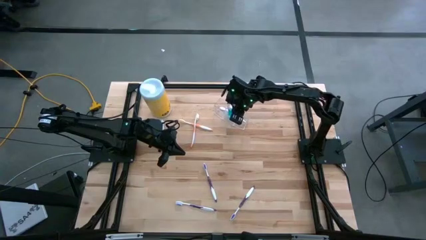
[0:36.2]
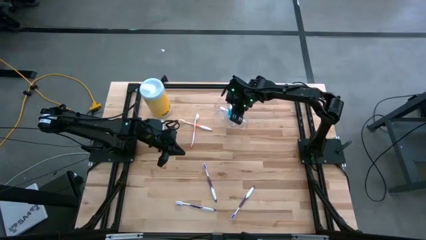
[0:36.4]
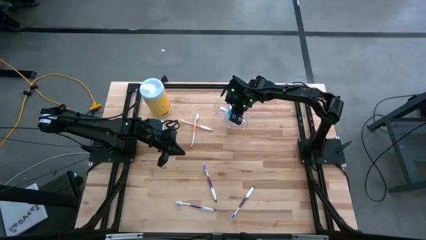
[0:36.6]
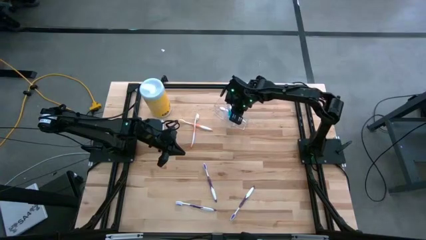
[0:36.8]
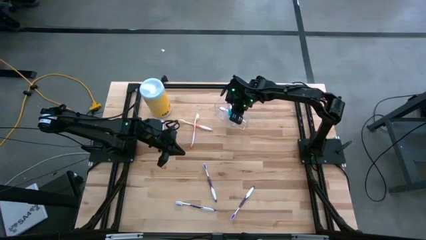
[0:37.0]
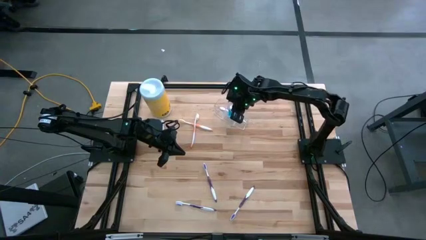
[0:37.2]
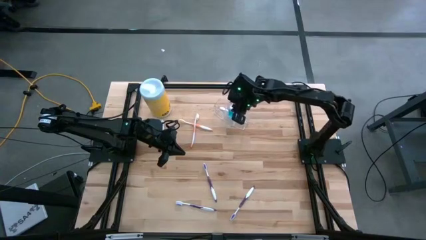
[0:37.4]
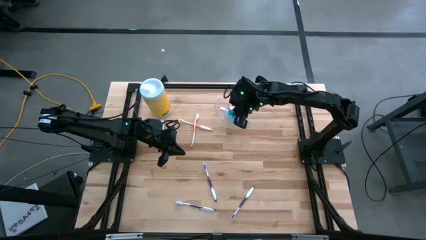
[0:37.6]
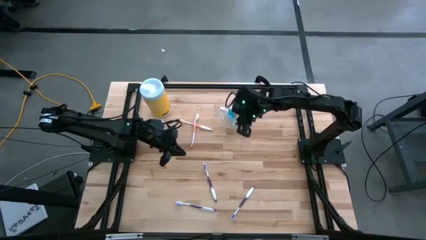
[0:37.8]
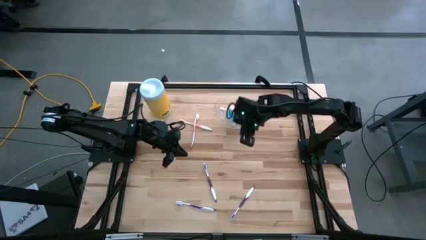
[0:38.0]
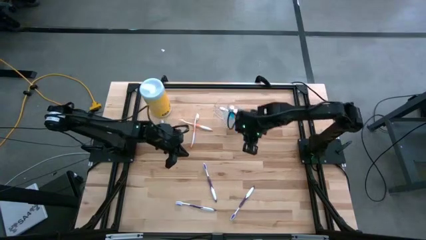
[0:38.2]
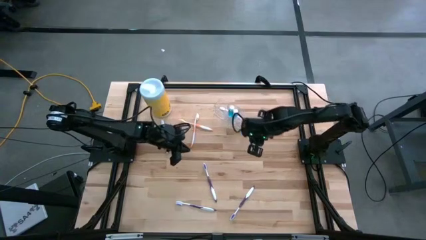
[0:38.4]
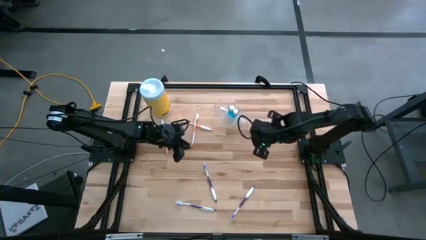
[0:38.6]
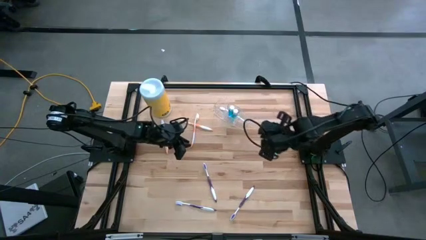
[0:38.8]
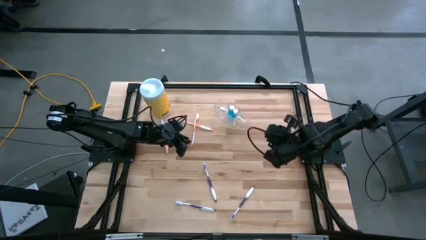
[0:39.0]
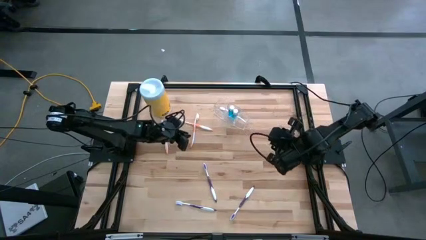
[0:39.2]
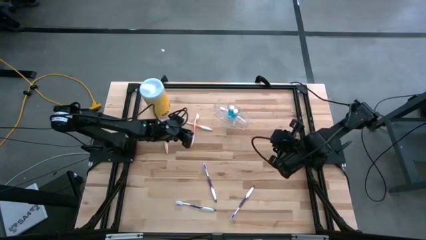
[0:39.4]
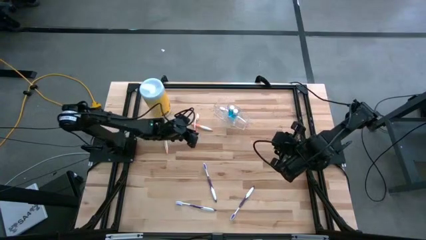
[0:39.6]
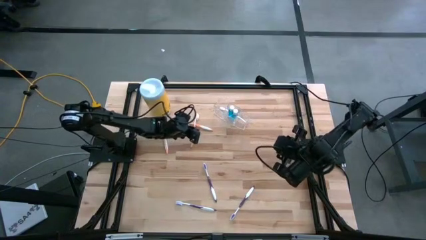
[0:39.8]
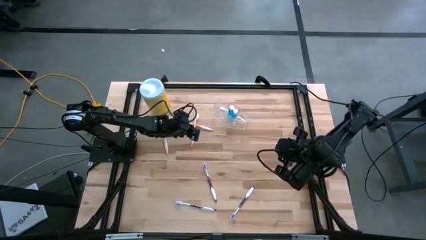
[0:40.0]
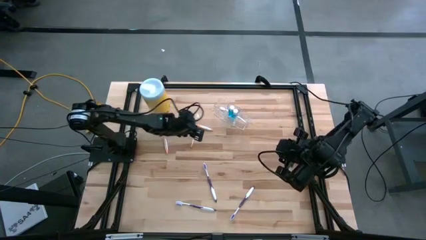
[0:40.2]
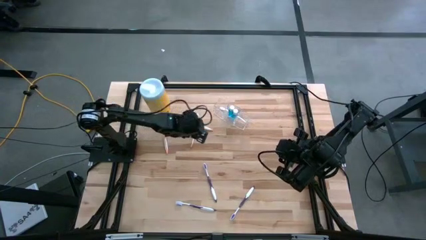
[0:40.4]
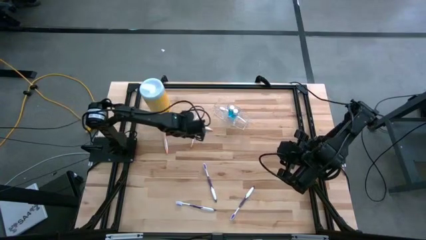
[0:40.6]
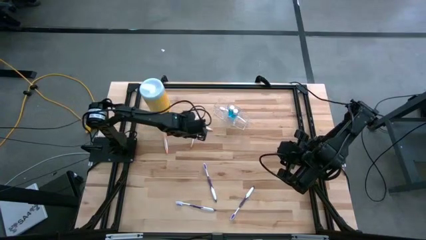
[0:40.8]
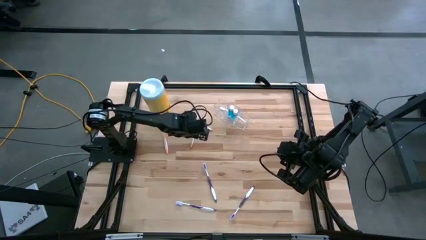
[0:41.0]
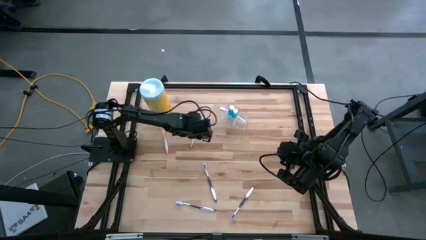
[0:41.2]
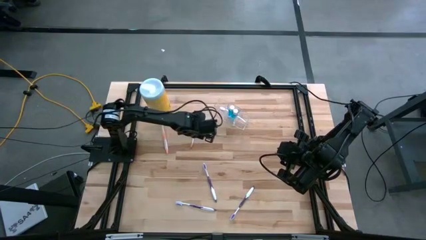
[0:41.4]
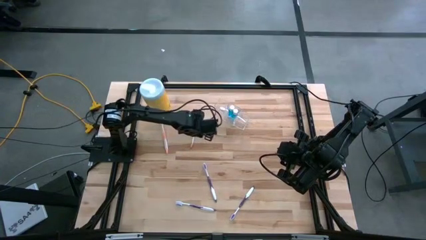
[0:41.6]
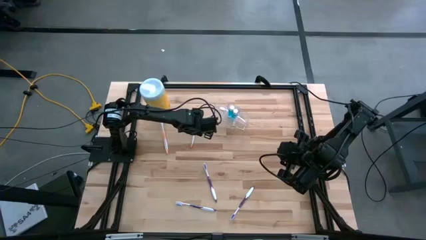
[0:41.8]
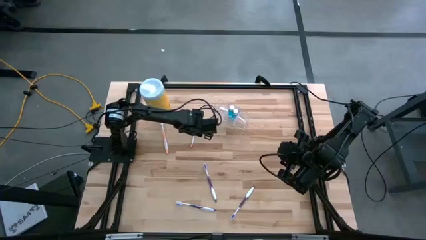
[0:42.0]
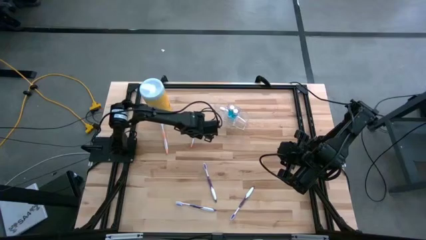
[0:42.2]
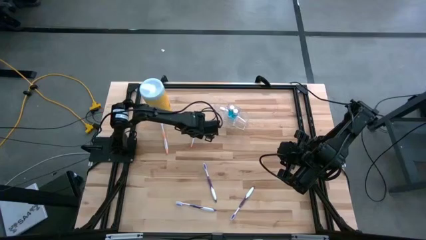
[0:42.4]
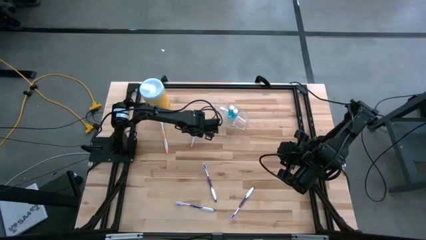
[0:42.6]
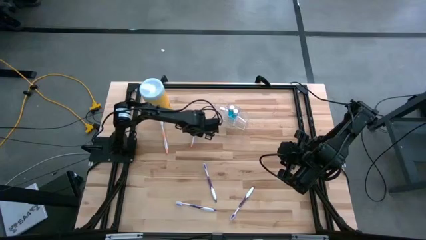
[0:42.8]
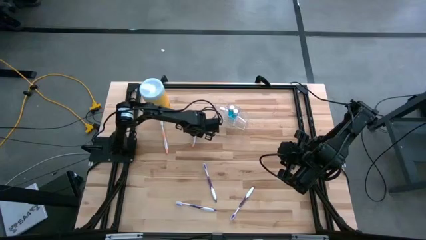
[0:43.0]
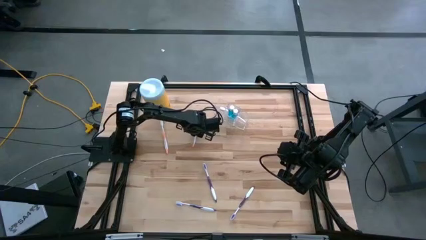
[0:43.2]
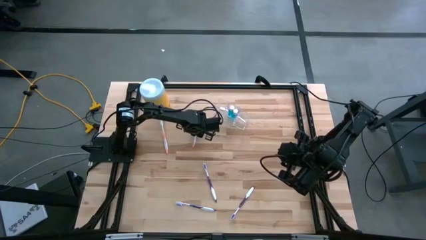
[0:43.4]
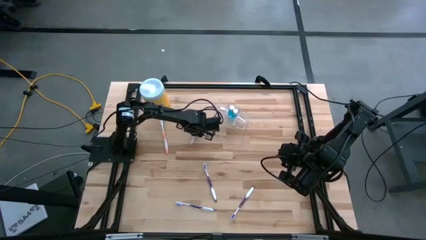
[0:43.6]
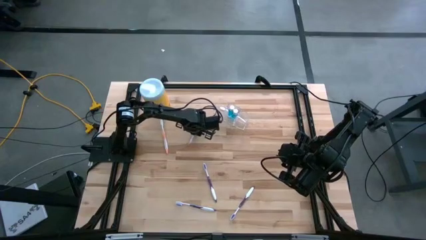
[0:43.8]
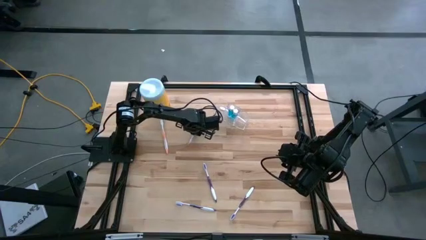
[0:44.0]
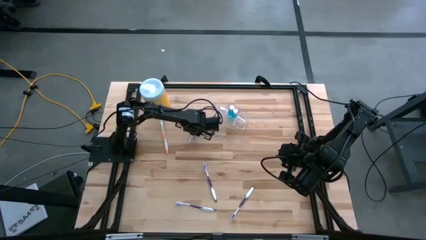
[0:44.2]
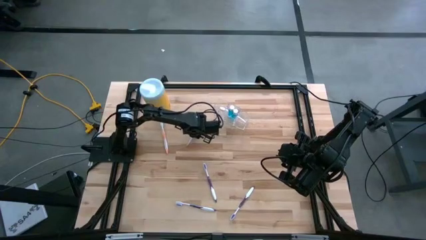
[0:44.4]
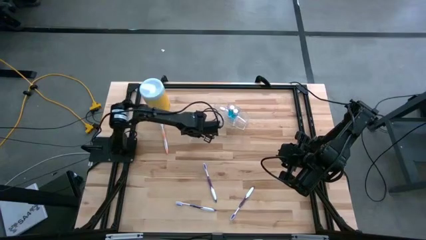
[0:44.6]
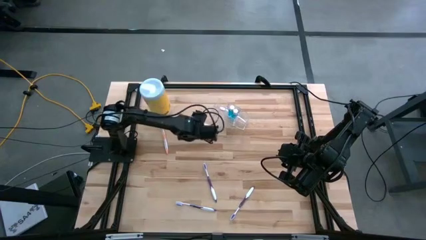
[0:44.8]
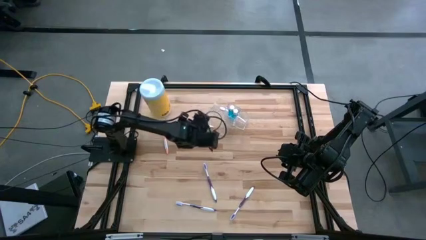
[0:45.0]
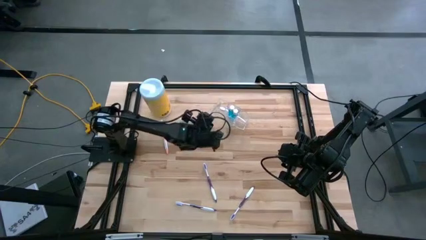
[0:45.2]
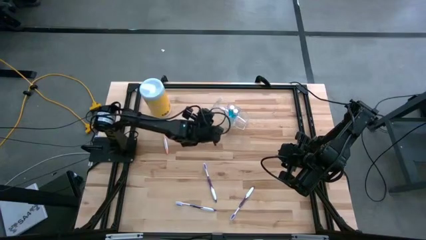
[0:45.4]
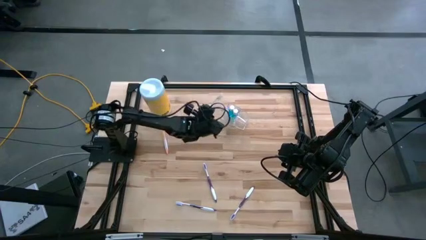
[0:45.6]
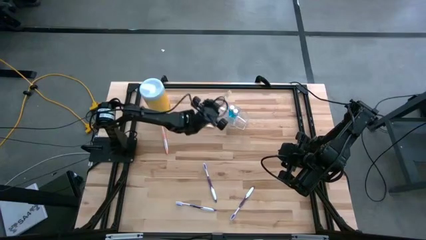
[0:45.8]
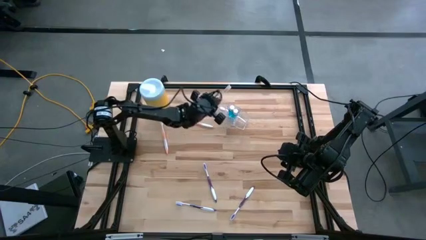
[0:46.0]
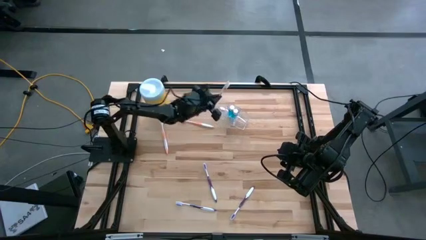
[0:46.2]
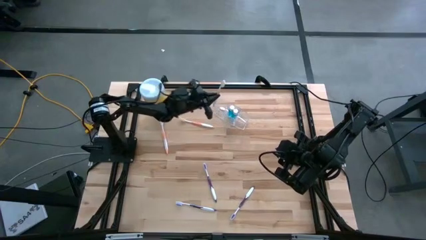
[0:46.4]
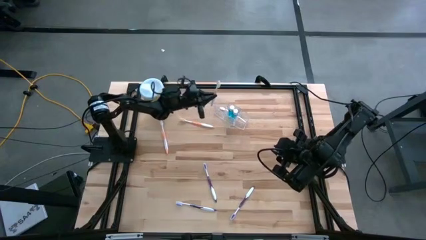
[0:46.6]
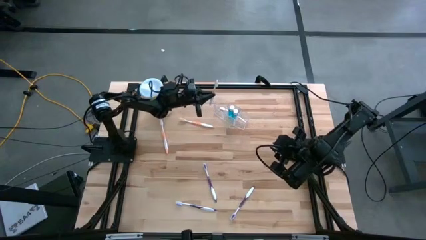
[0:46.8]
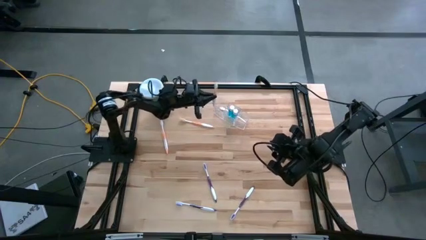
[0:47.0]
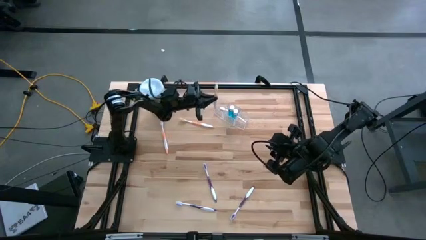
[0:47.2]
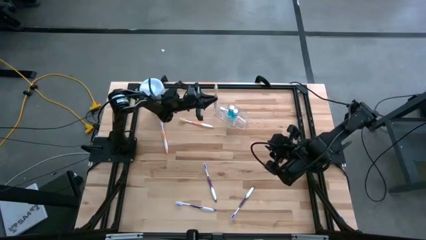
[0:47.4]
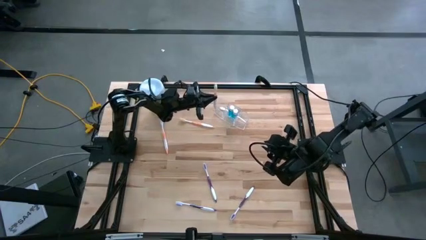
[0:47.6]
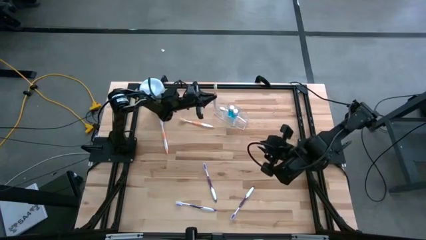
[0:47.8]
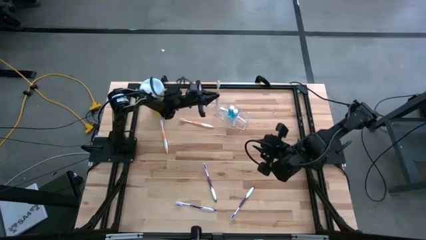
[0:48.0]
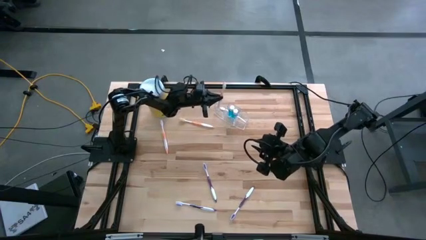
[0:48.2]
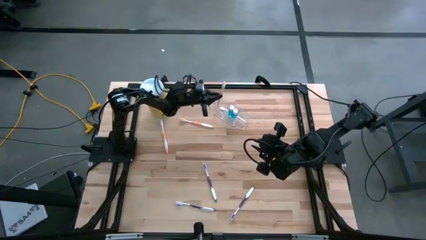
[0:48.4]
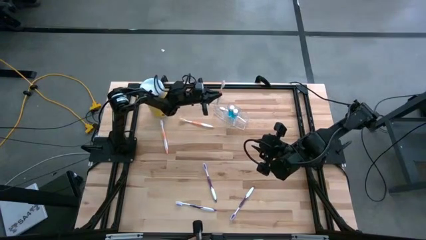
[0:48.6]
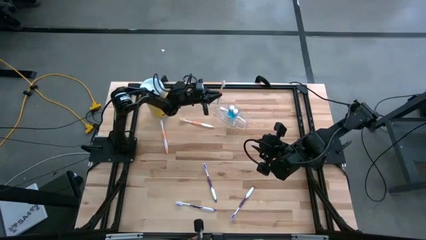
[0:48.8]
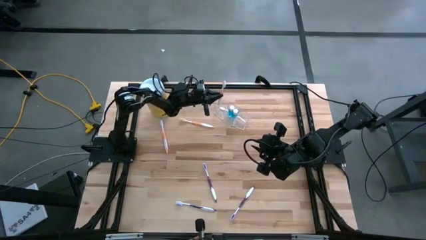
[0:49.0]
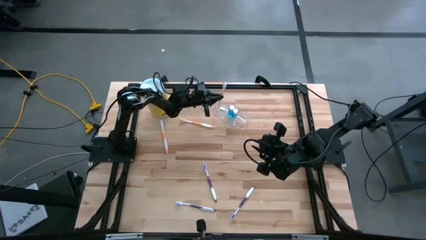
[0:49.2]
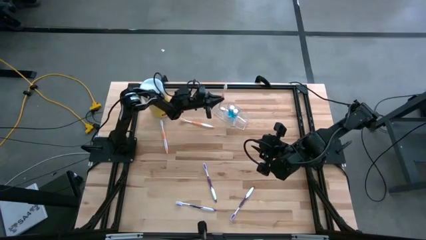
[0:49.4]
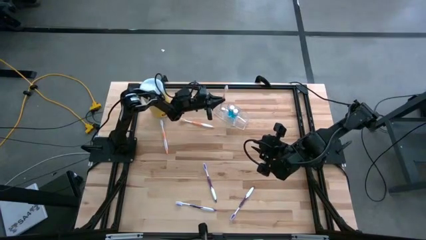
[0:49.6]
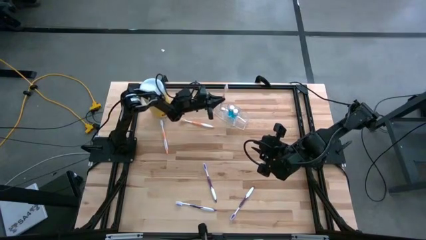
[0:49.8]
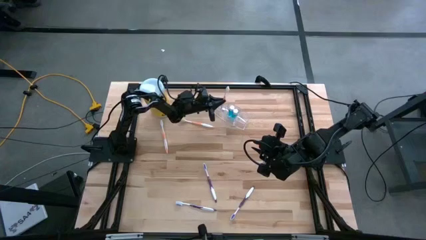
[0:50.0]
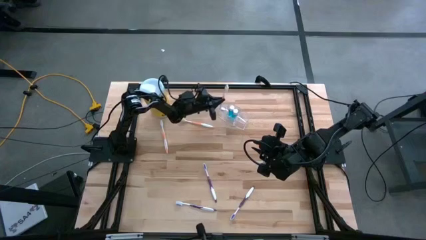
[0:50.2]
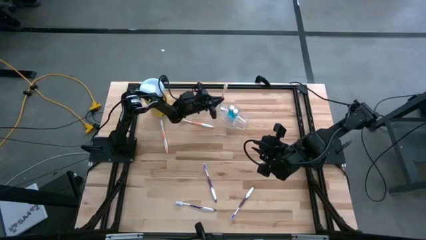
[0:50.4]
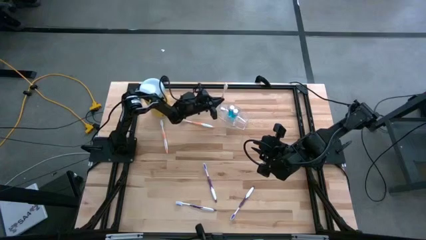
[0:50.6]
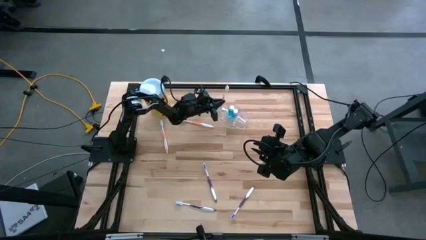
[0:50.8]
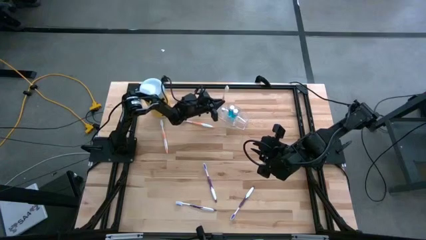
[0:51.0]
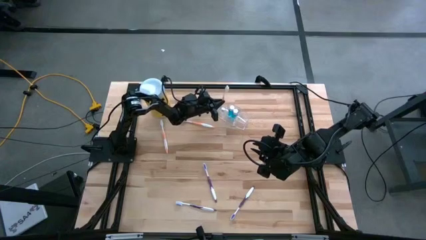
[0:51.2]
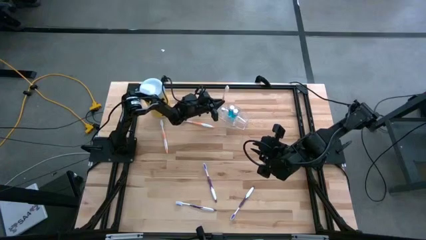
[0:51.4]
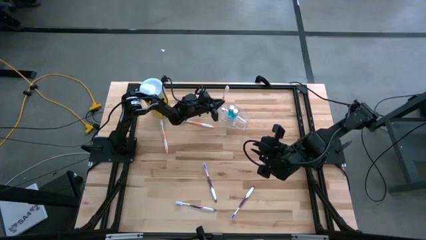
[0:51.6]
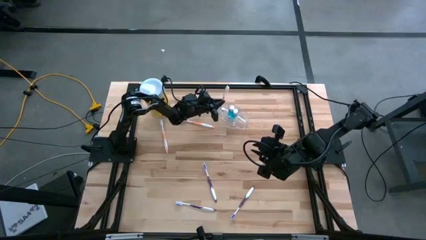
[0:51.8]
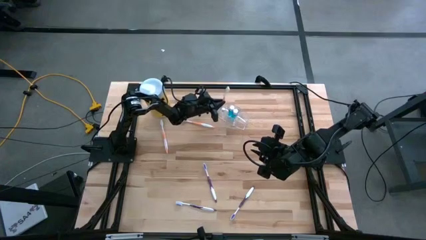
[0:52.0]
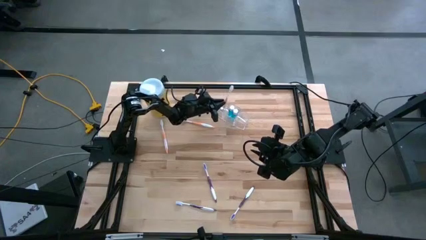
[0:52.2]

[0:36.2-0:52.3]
Task: Pick & Place toothbrushing station
Put the middle orange toothbrush into the transparent organizer
